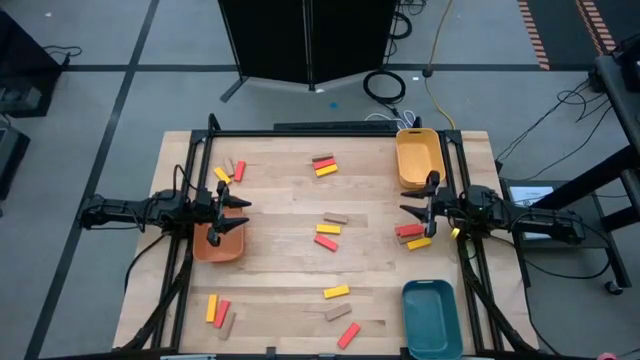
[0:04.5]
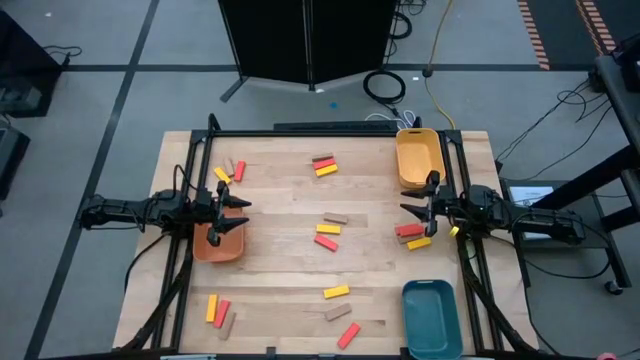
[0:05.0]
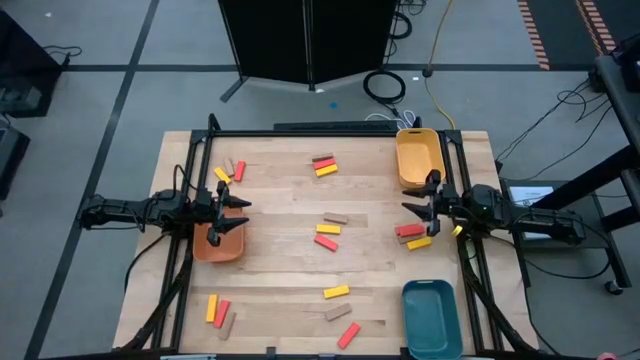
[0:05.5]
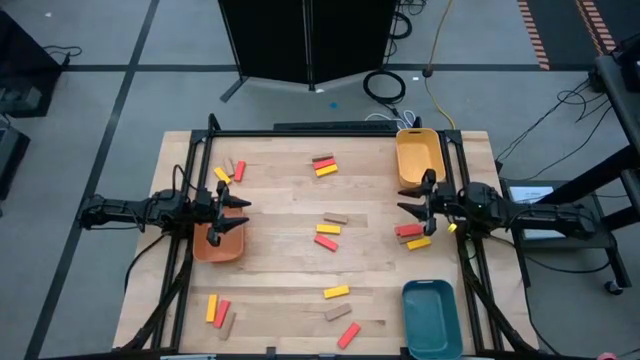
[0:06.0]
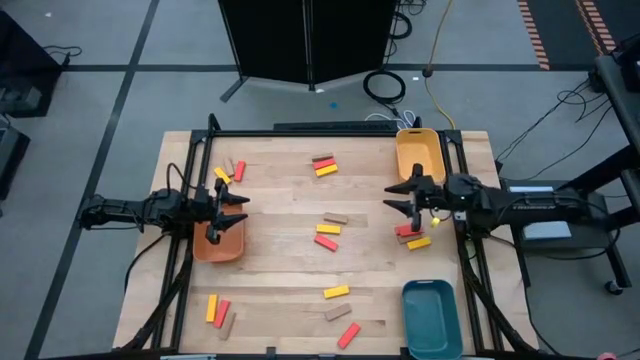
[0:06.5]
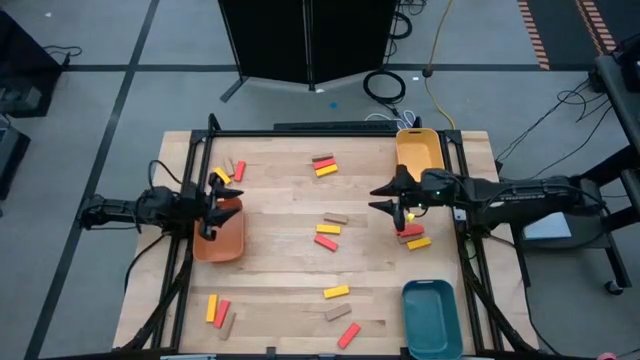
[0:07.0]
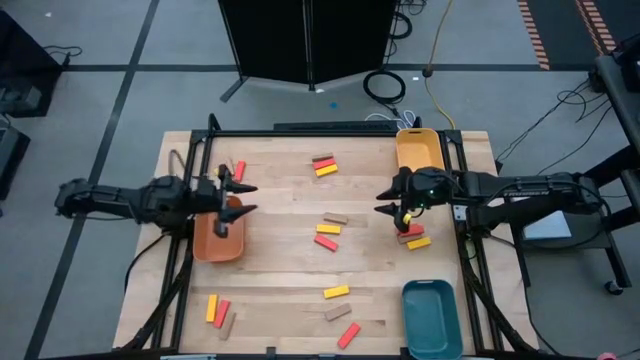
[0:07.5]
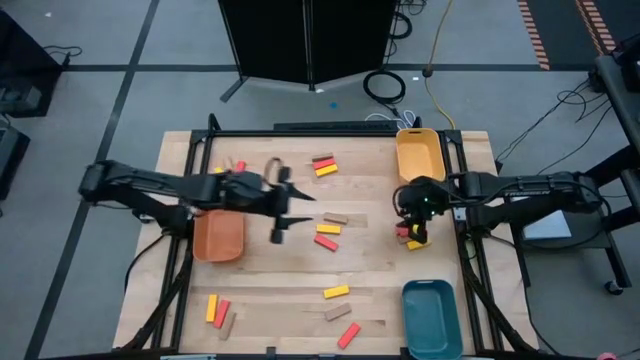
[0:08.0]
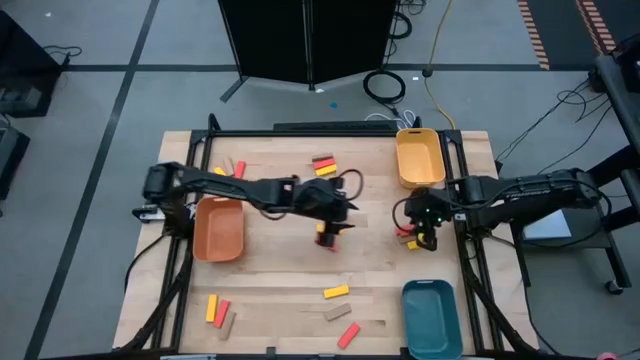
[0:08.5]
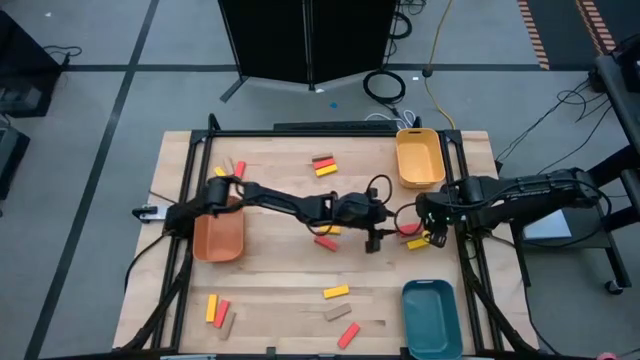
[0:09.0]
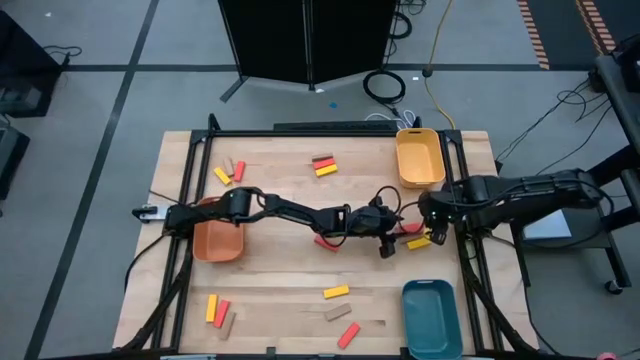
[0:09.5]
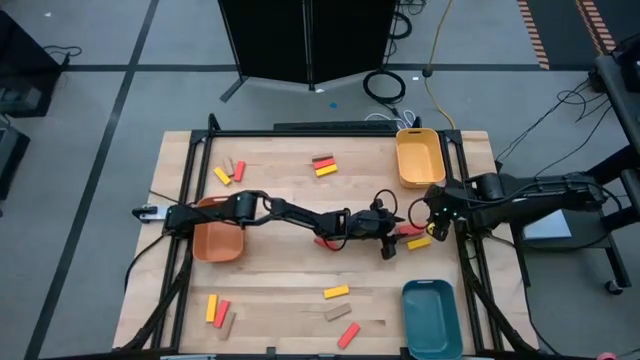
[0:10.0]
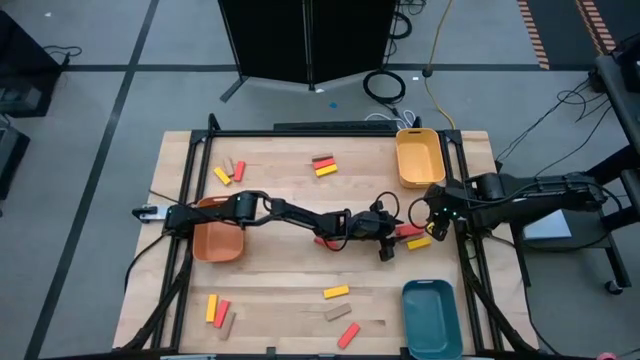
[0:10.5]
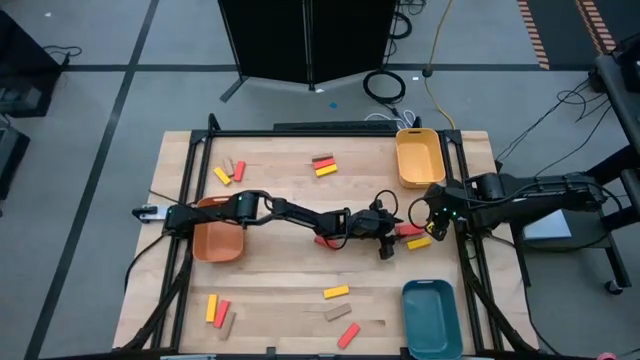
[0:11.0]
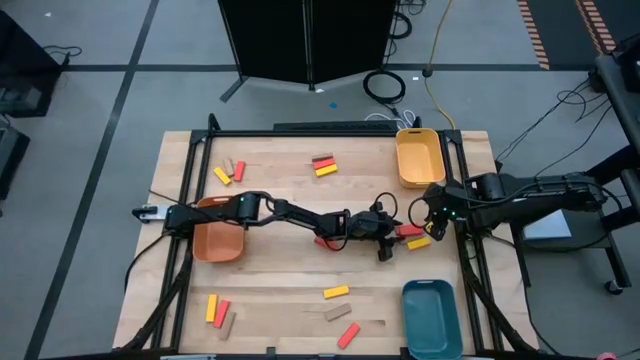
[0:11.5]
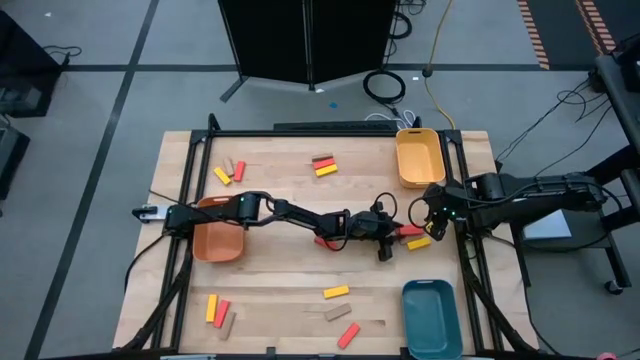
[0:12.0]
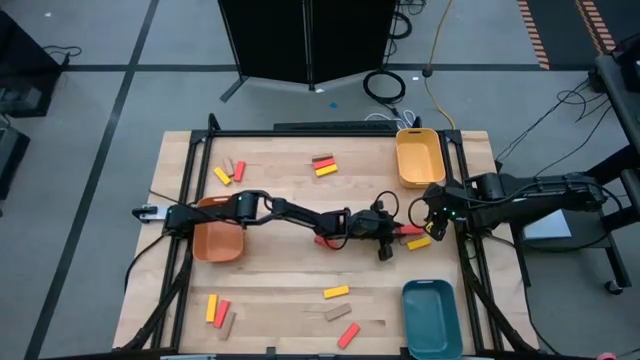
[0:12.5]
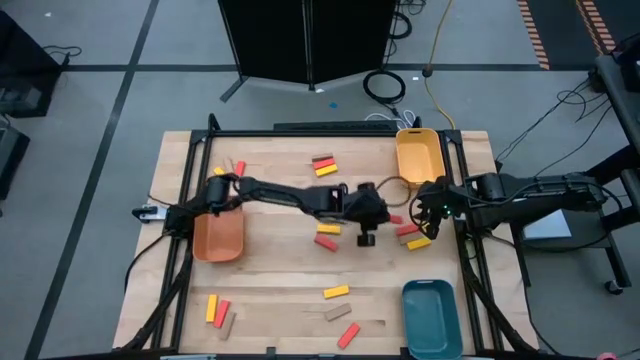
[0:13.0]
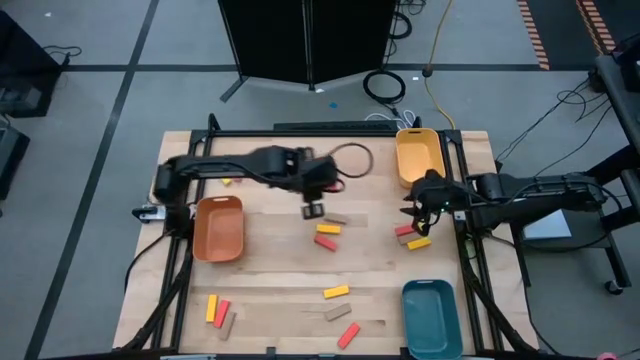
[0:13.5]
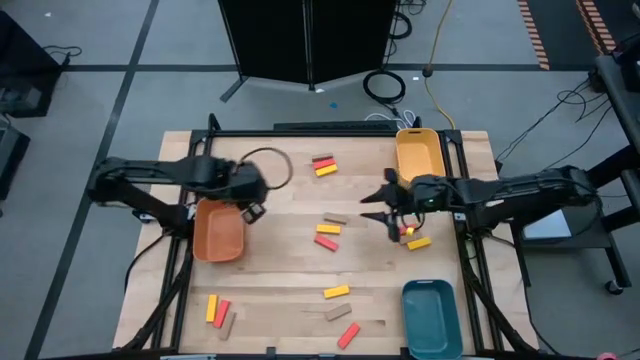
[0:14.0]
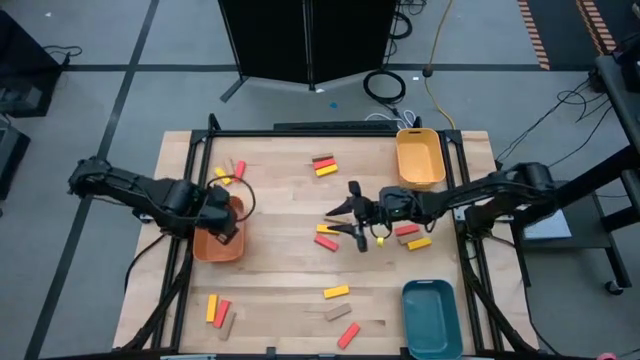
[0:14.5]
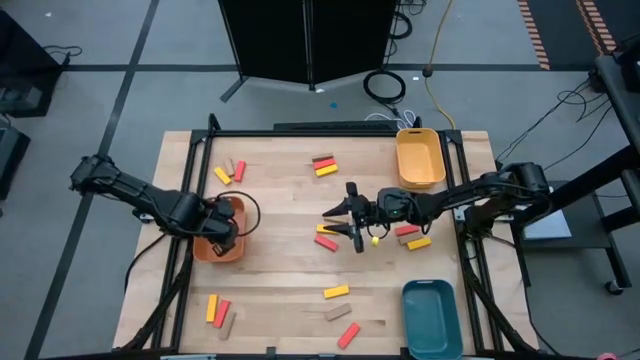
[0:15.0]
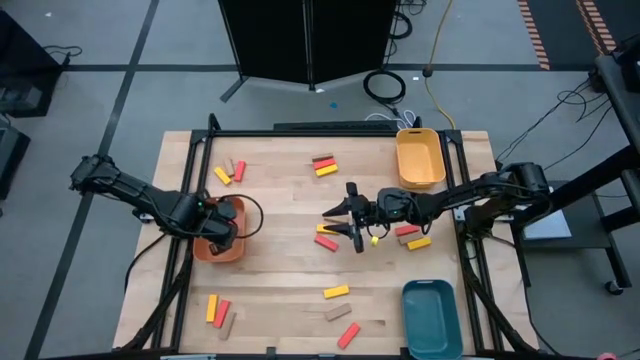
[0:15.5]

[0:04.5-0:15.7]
Task: Sort blocks
Put the orange block into the orange bin

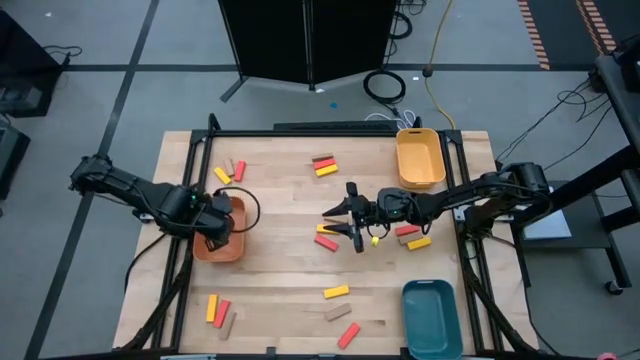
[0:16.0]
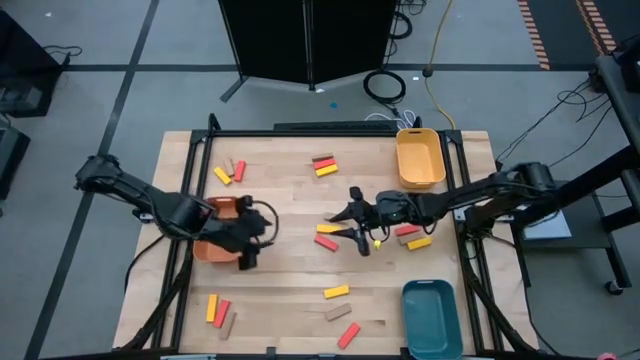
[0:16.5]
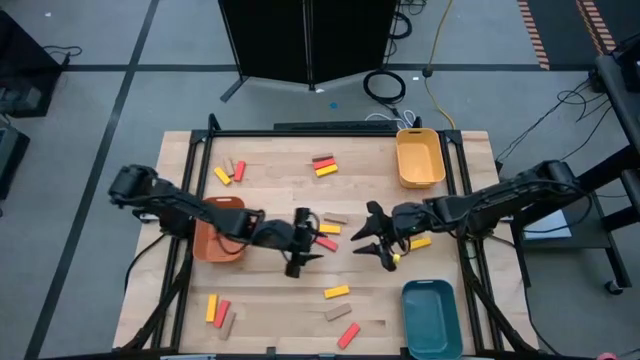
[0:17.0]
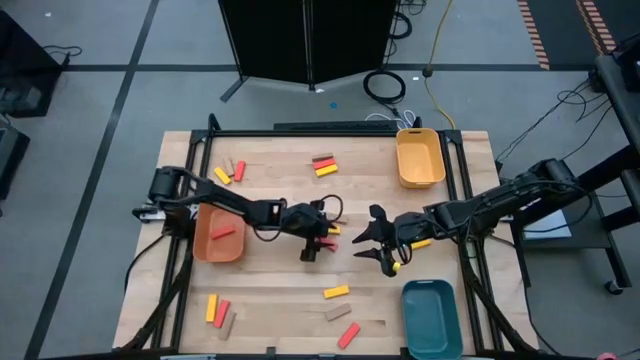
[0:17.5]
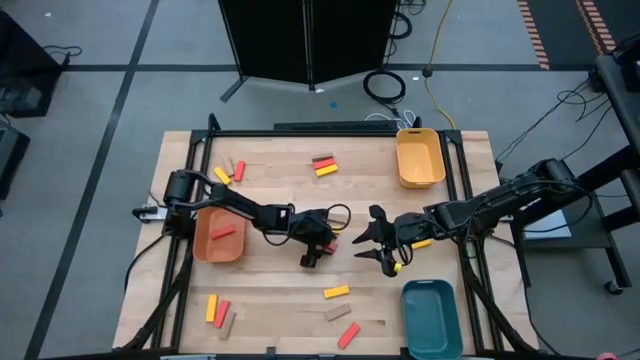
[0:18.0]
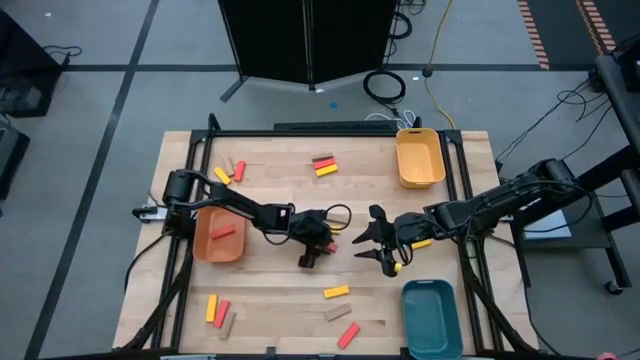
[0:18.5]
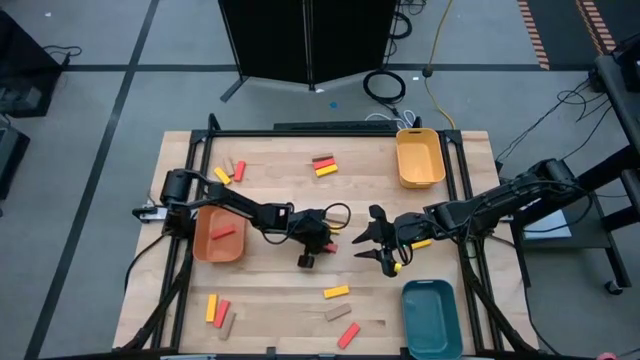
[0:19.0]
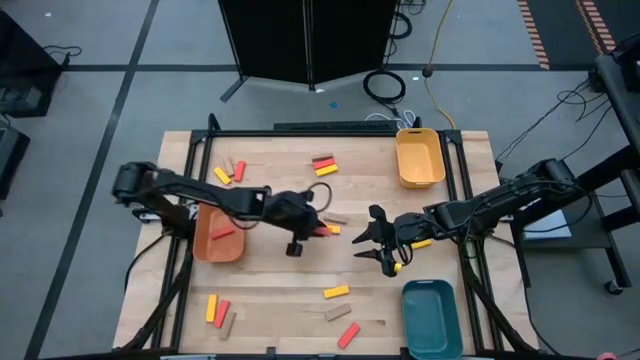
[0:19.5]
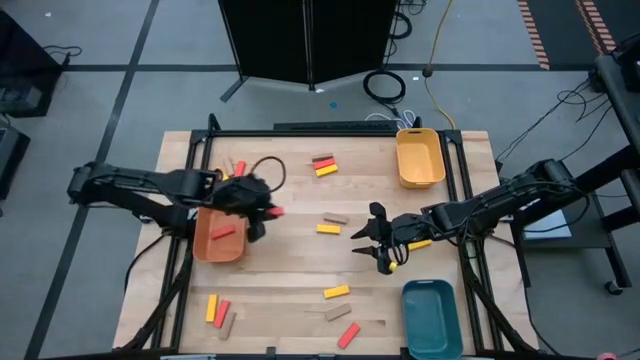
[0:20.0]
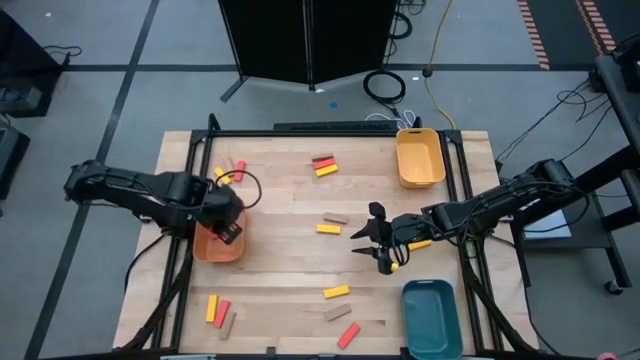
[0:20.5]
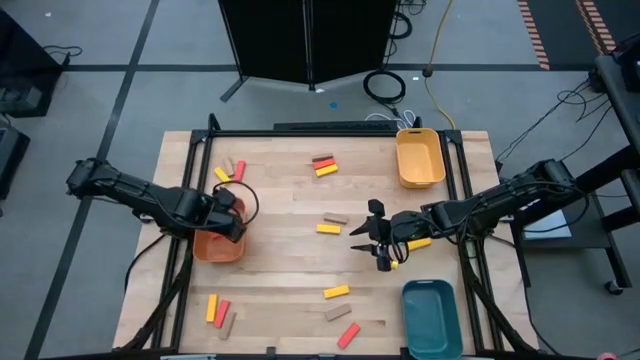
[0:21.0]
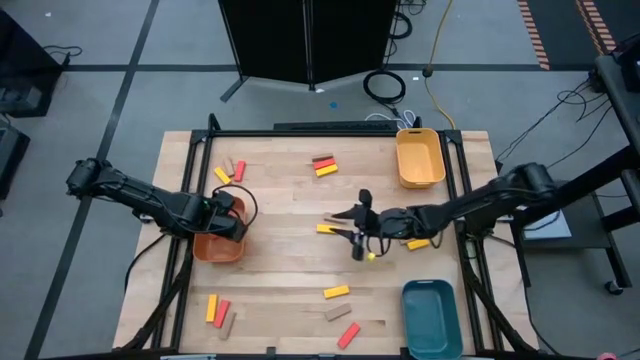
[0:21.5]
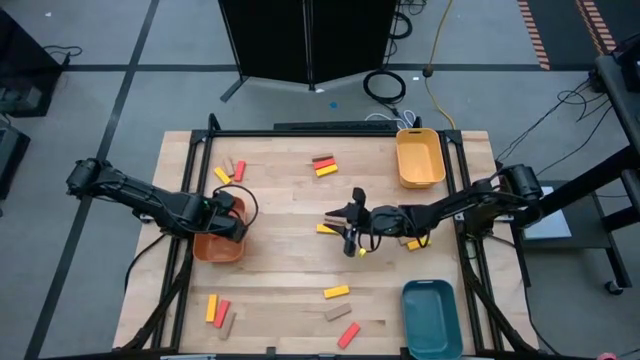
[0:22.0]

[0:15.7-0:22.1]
Put the orange block into the orange bin

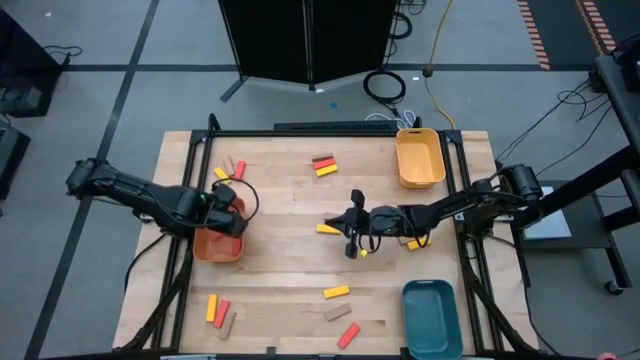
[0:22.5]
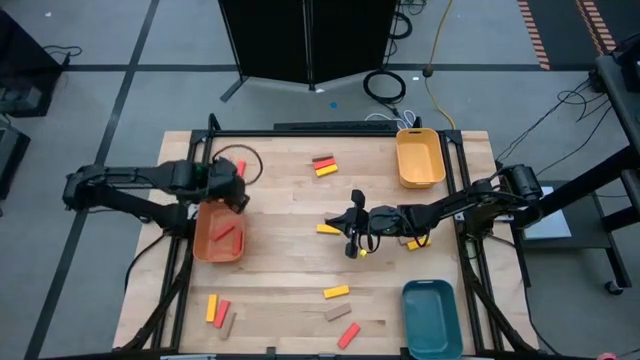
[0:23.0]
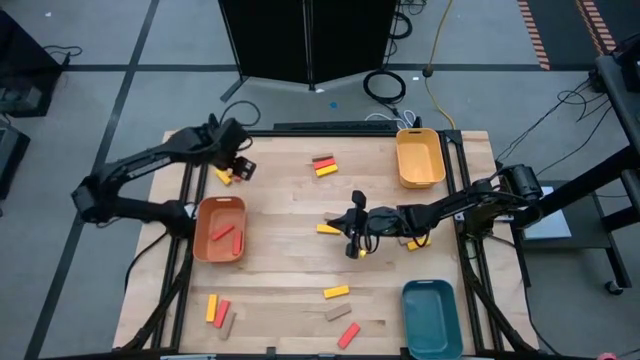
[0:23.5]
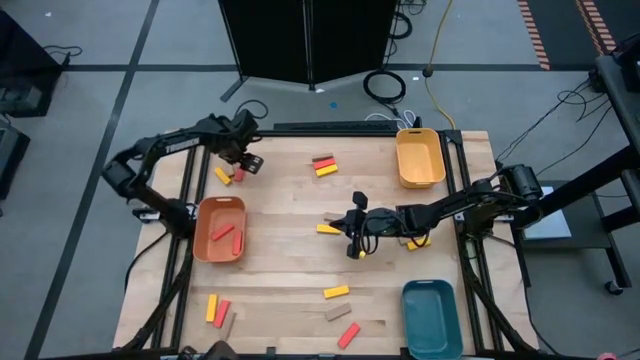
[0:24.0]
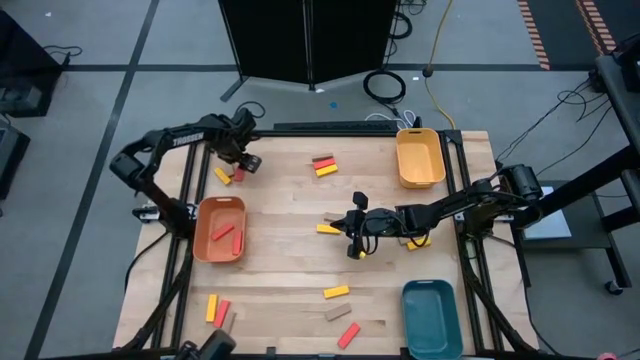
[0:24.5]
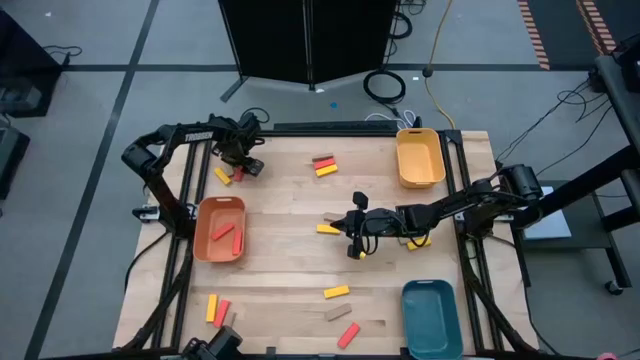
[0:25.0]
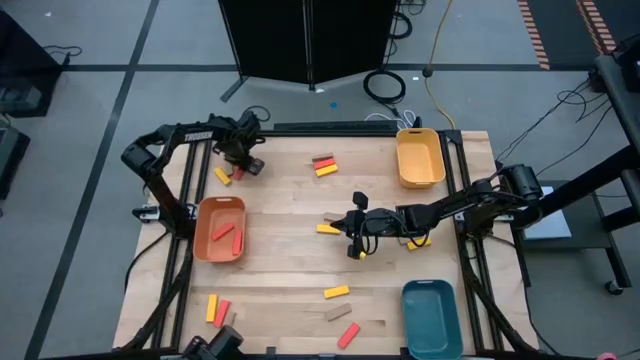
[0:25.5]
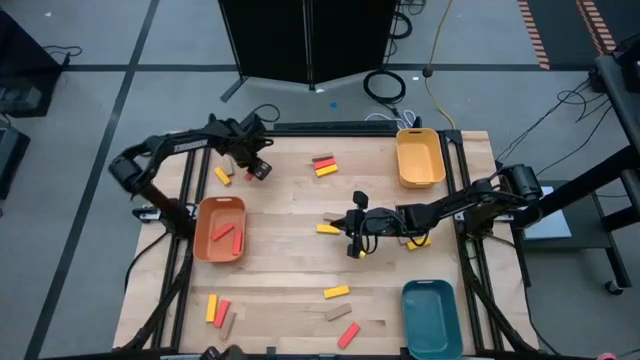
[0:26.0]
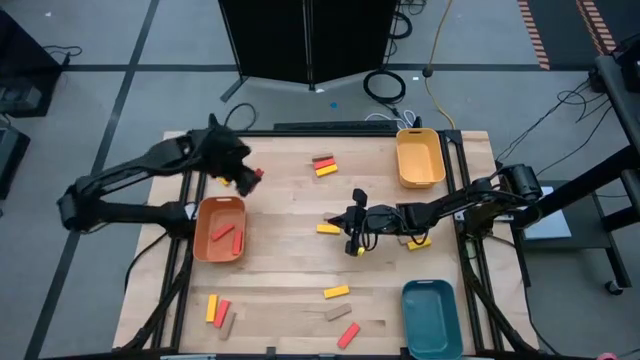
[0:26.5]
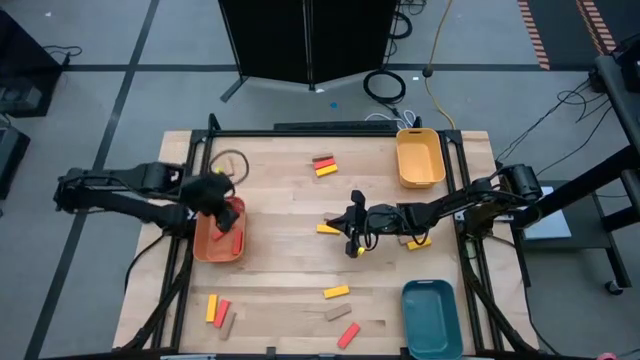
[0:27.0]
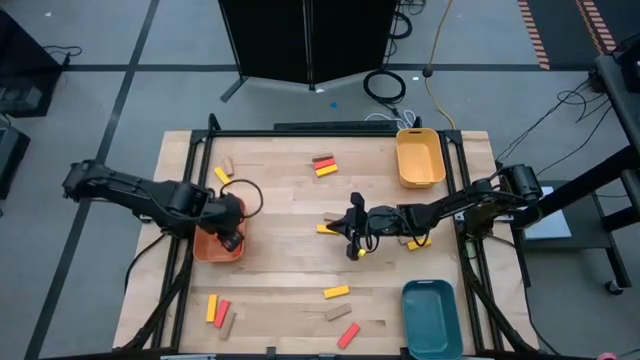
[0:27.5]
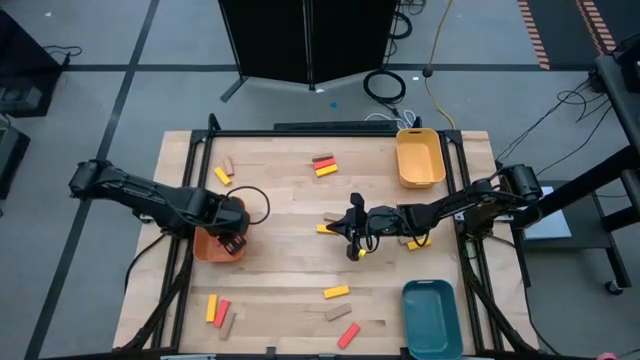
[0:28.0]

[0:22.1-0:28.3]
Put the orange block into the orange bin
